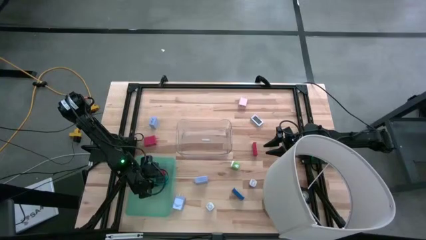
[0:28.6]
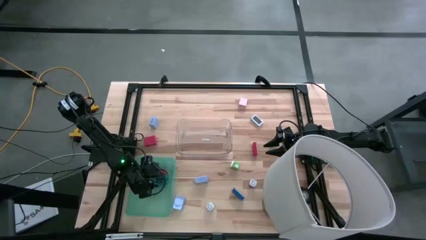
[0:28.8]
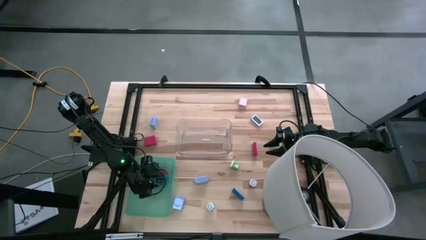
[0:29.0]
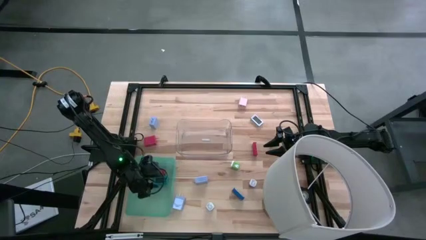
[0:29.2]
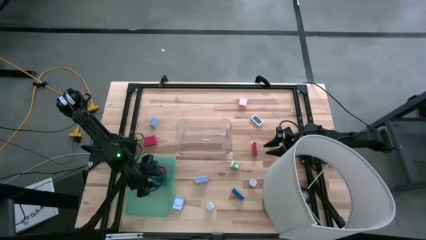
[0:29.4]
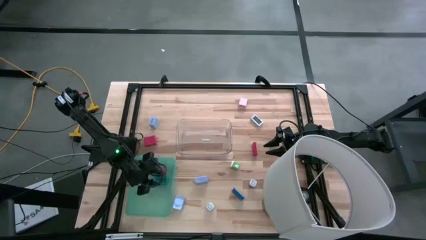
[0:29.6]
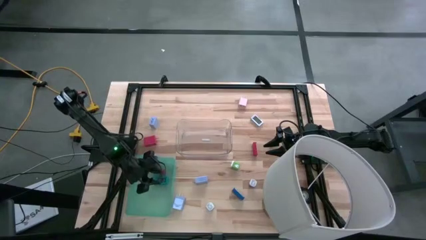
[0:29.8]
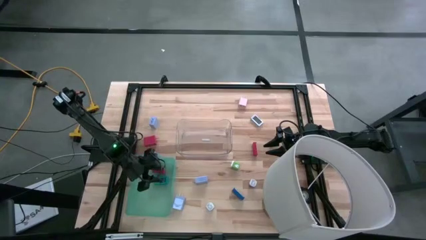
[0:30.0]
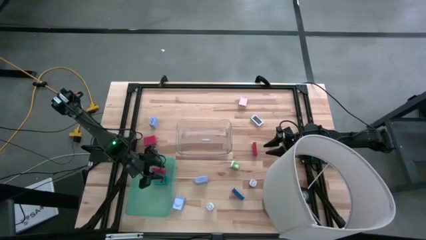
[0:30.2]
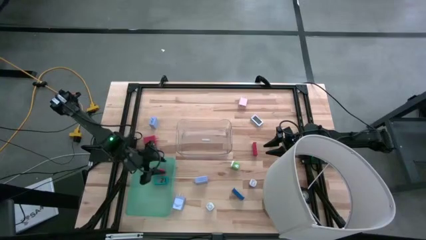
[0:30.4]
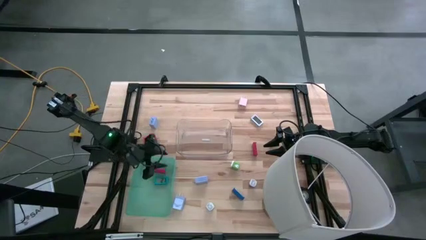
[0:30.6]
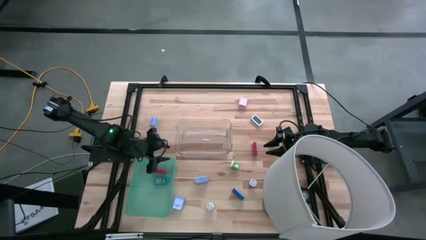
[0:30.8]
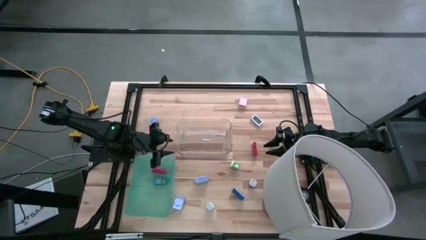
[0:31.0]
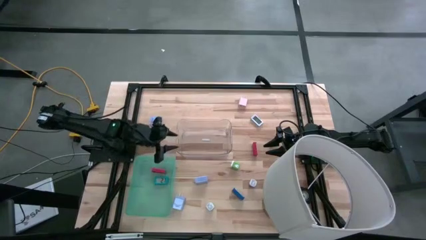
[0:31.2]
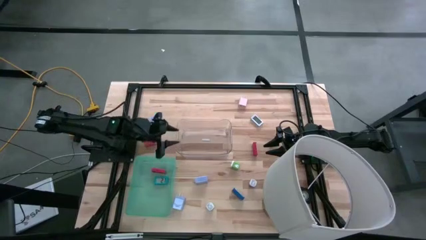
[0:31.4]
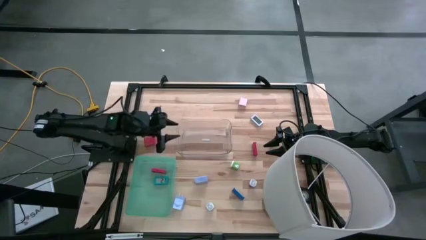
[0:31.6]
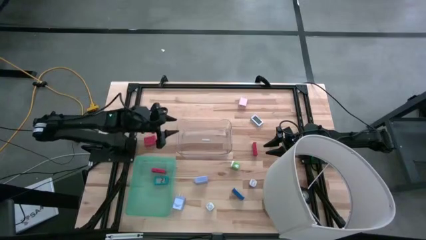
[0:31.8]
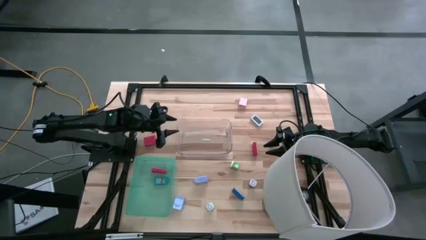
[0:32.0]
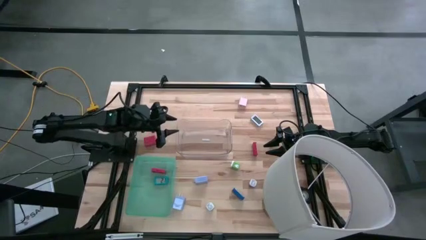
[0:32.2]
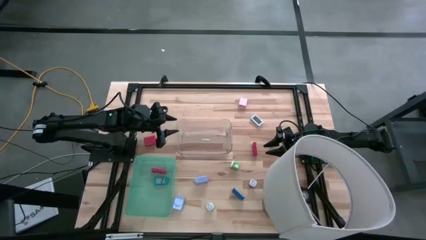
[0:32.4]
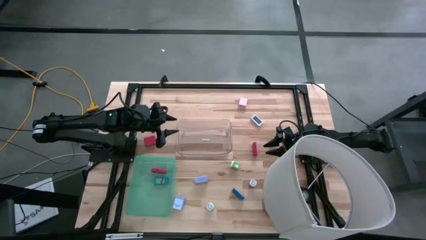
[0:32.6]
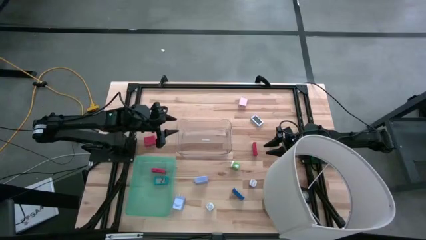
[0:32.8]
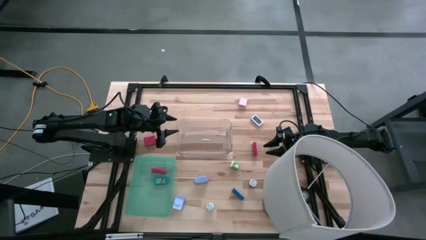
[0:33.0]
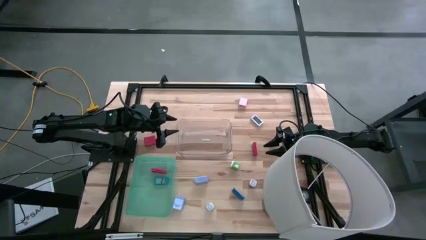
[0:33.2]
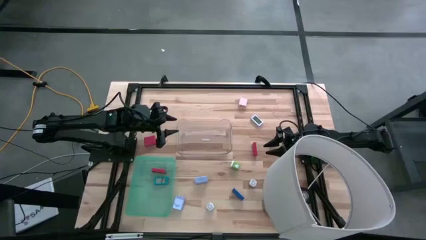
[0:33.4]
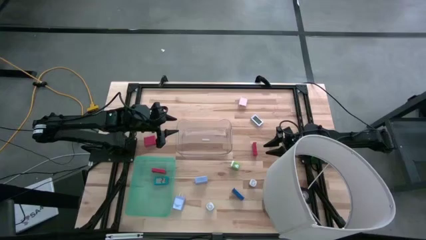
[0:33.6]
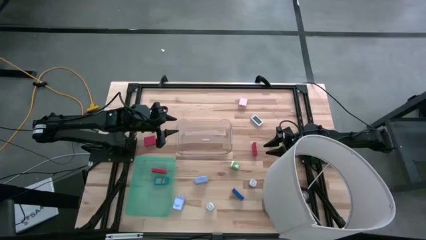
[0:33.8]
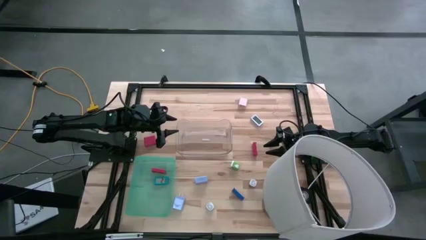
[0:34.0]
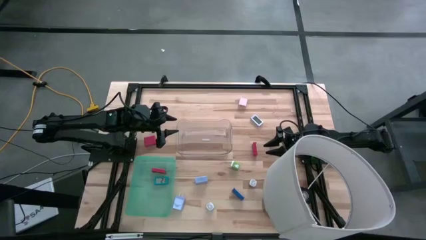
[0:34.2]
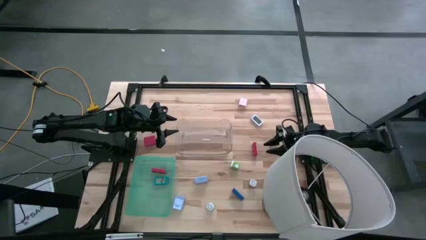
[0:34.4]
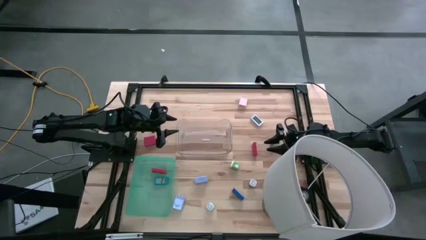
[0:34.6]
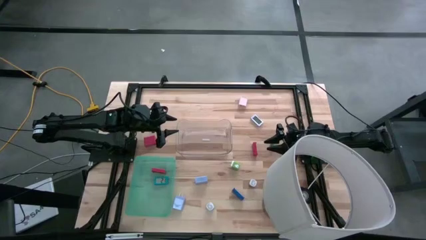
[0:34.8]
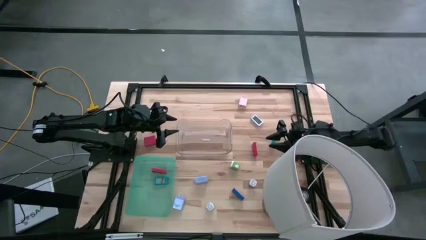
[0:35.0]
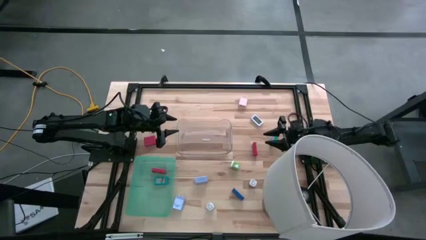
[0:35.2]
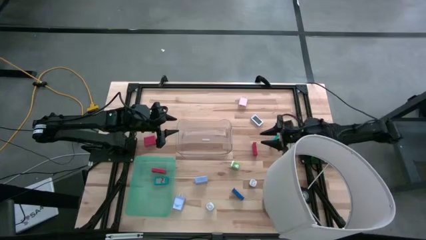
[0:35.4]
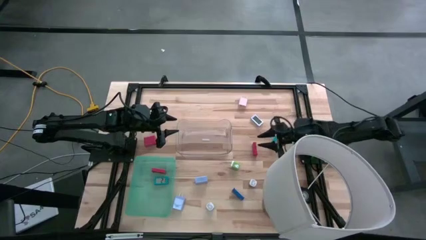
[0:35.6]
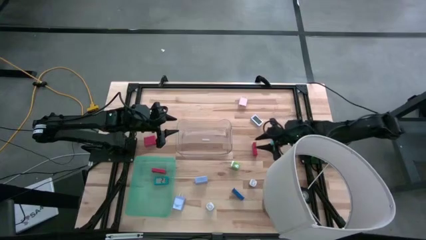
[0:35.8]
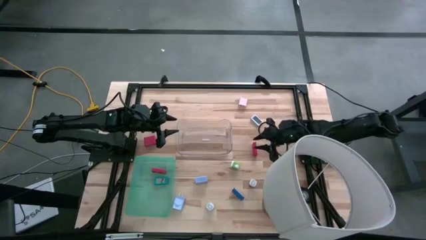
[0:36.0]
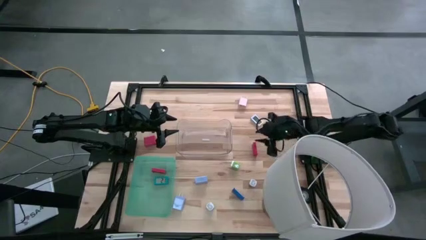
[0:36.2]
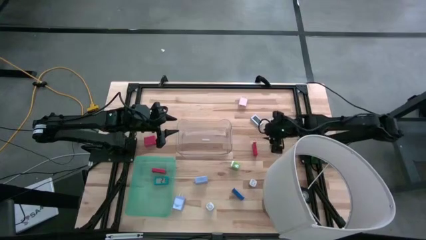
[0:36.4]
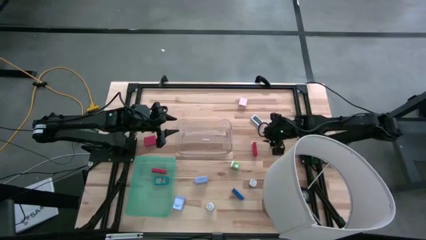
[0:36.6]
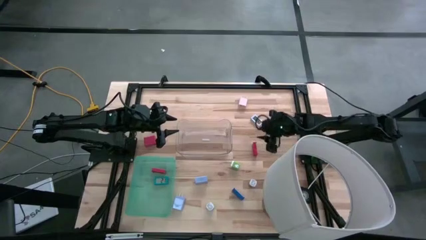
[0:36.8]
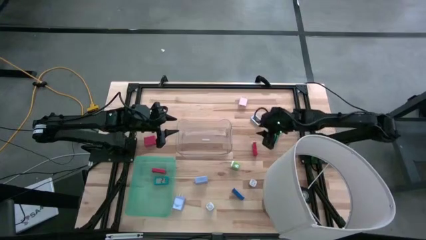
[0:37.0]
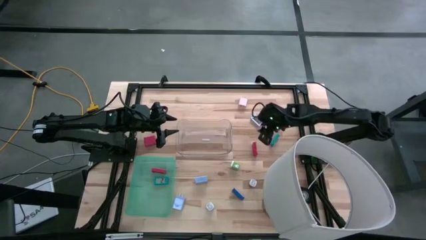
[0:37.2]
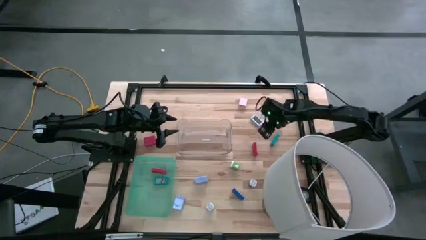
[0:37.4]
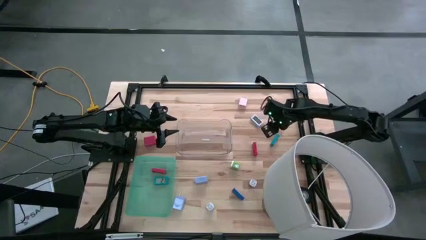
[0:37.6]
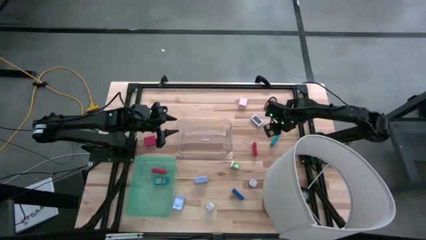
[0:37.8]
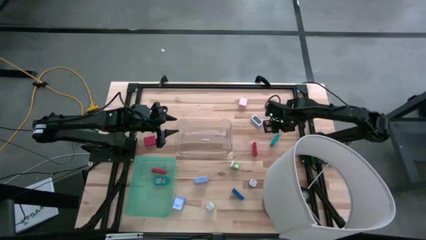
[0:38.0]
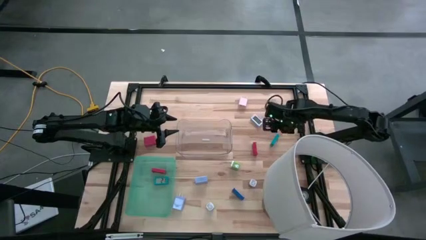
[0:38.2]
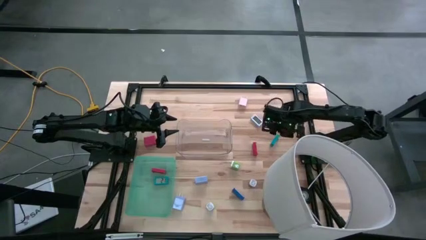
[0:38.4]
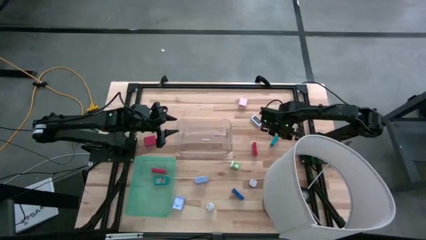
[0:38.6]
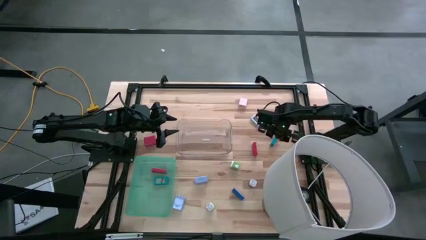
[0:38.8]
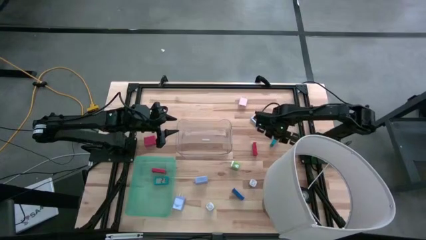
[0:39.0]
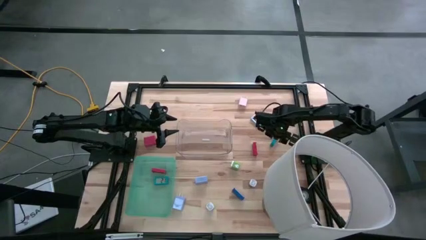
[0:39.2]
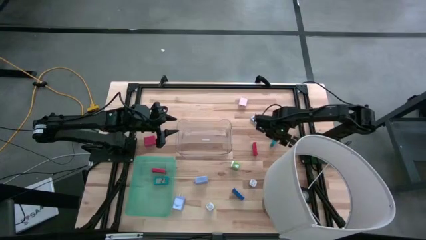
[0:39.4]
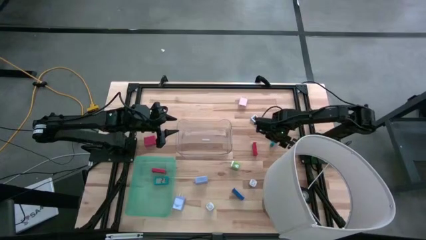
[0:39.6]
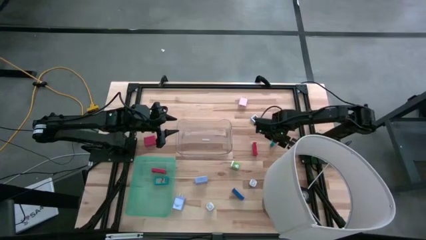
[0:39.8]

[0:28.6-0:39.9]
Task: Pick & Place Office items
Put the light blue digital clock into the green bin
